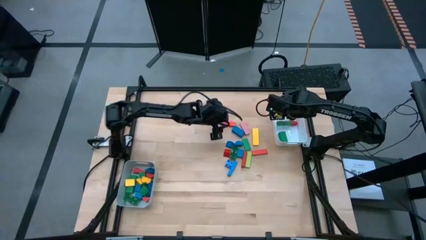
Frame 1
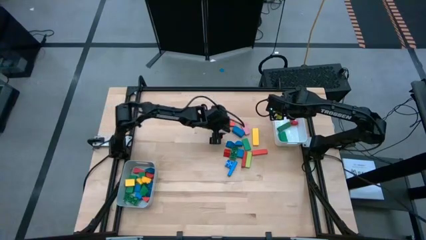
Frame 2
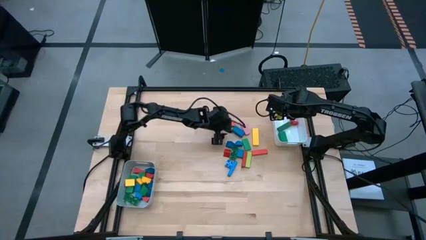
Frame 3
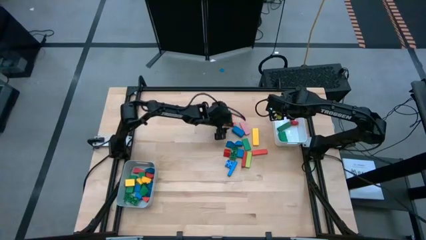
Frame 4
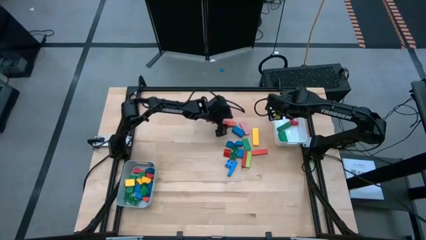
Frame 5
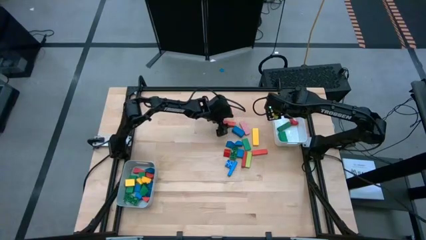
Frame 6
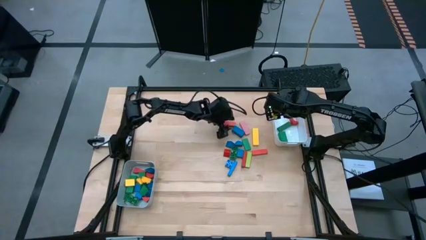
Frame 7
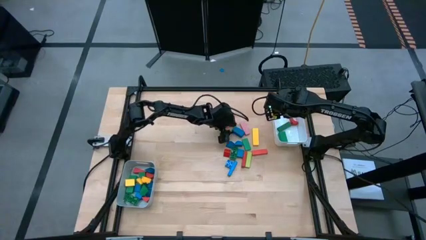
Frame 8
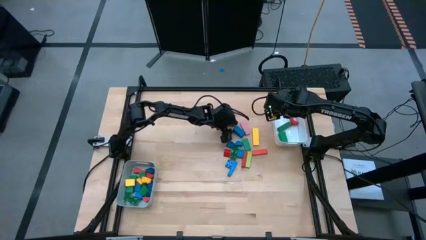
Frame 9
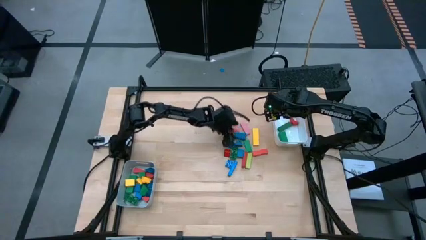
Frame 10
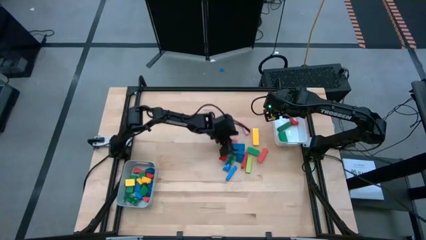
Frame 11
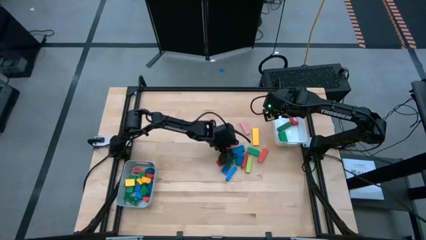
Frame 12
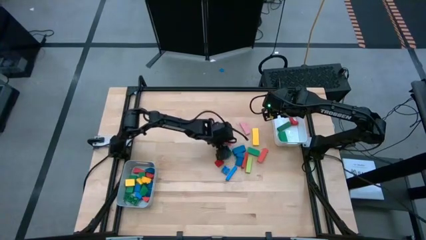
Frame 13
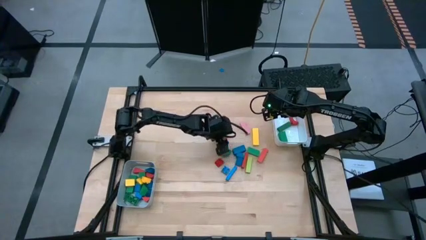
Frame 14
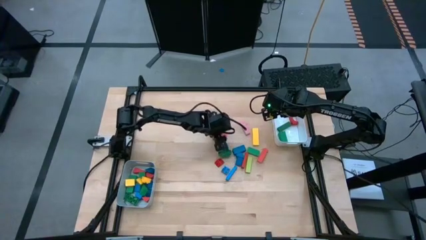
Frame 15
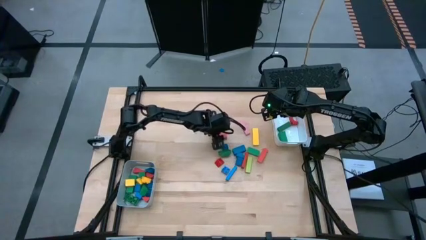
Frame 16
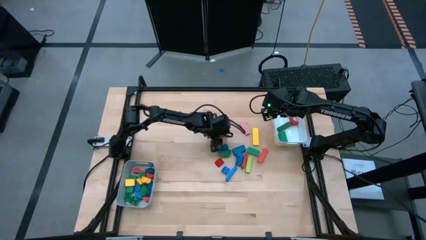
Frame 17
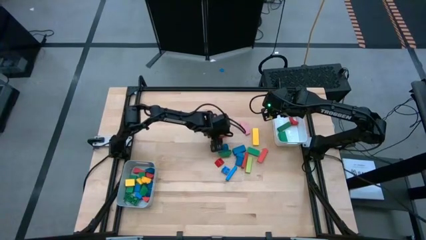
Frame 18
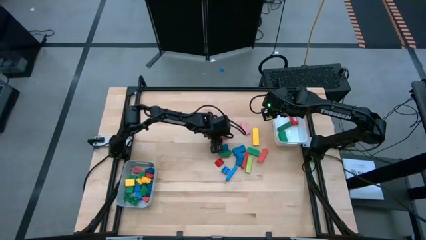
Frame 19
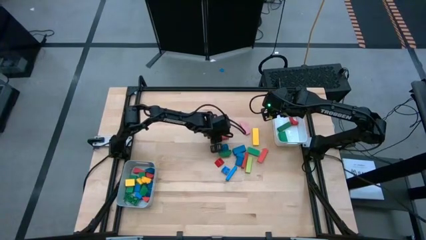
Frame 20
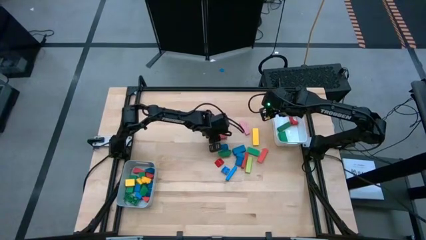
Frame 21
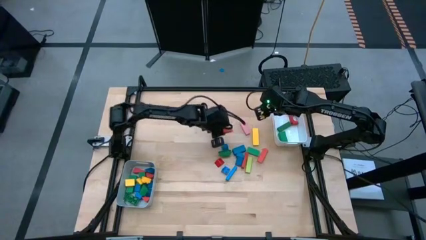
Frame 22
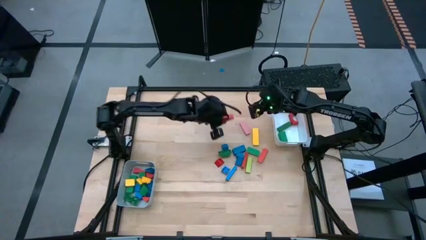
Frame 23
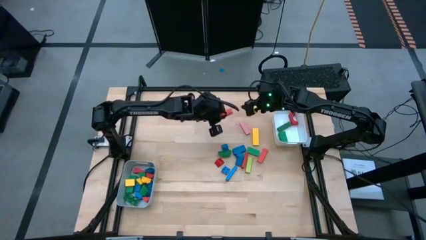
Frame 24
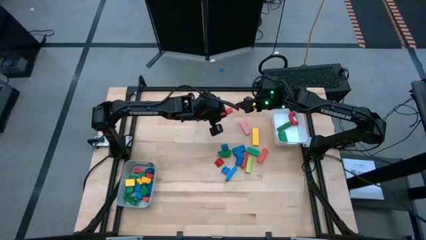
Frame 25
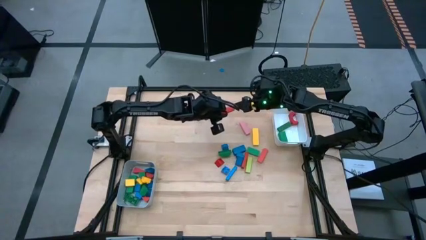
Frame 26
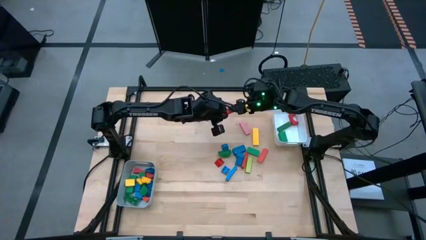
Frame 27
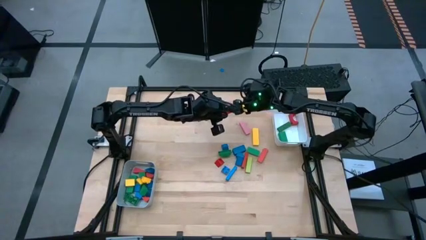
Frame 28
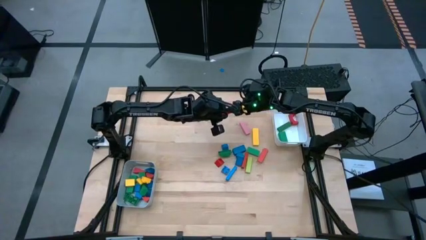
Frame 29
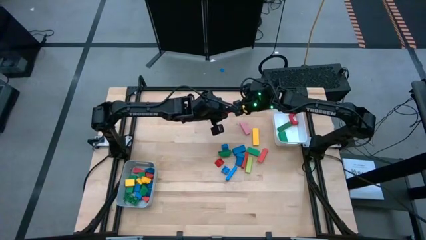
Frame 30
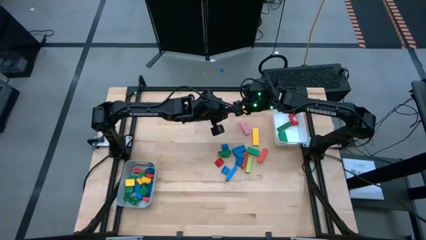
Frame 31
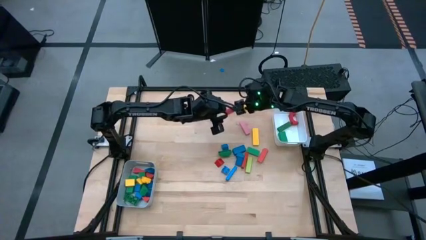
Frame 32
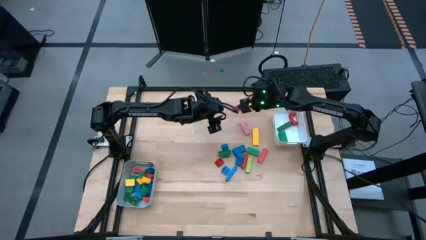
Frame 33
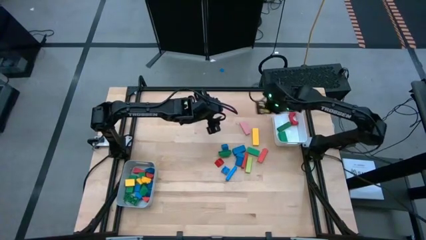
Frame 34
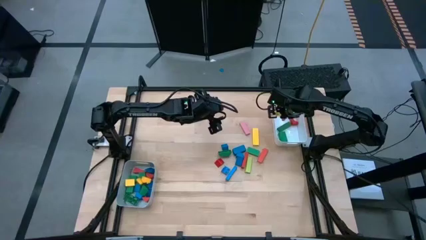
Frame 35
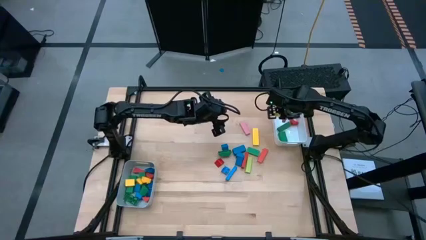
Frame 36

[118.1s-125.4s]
Task: Sort blocks by size
Put the orange block into the white bin

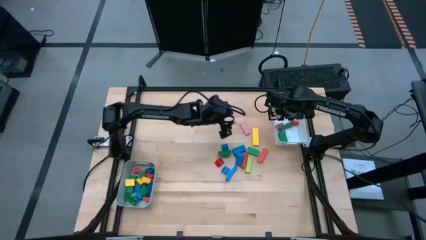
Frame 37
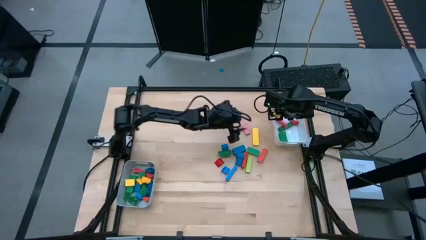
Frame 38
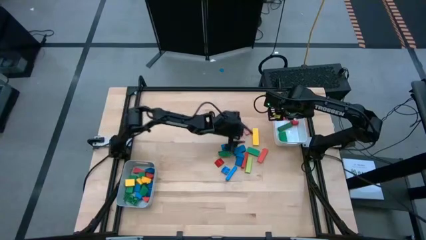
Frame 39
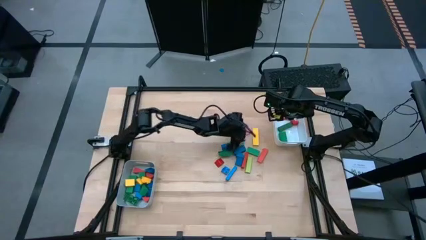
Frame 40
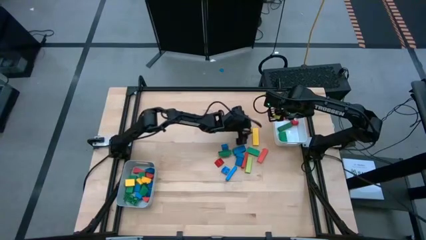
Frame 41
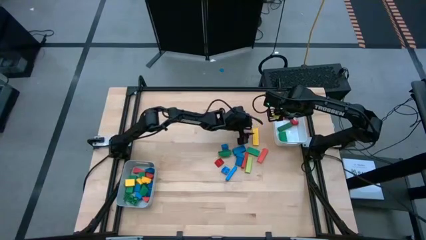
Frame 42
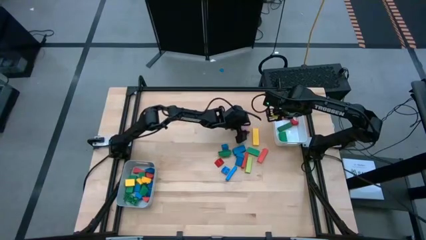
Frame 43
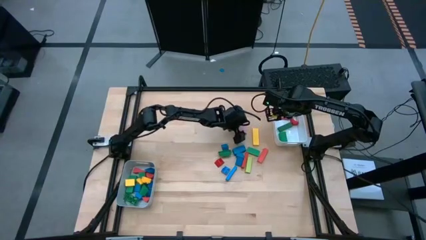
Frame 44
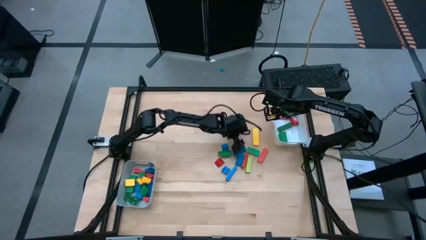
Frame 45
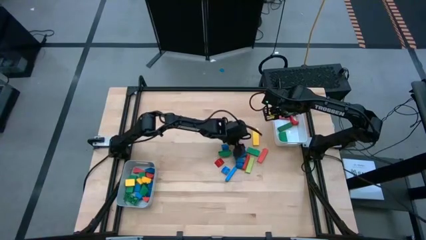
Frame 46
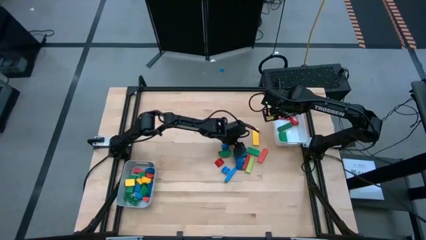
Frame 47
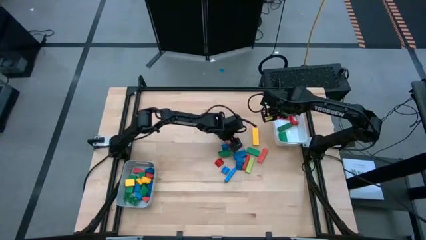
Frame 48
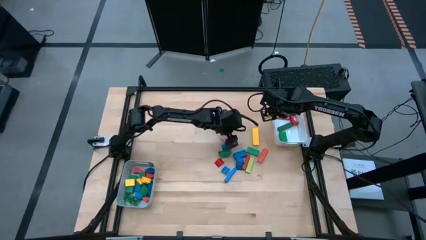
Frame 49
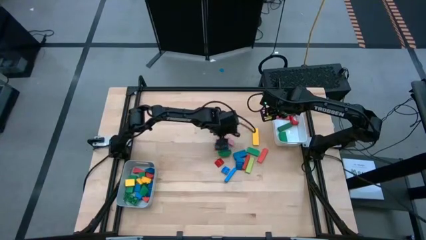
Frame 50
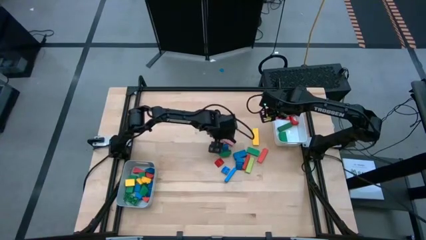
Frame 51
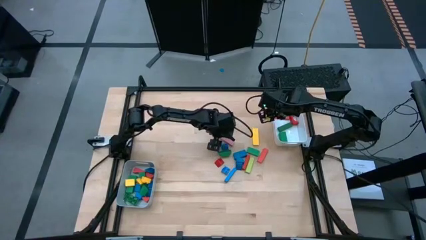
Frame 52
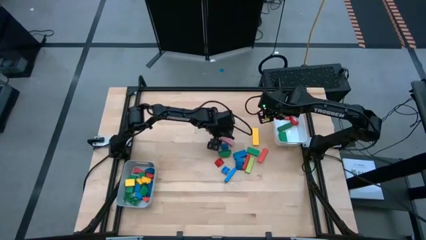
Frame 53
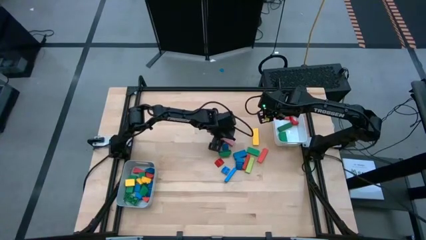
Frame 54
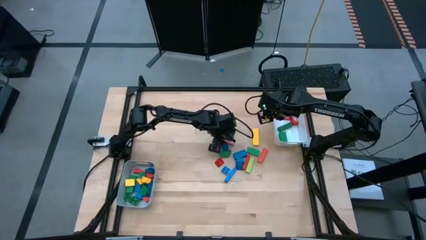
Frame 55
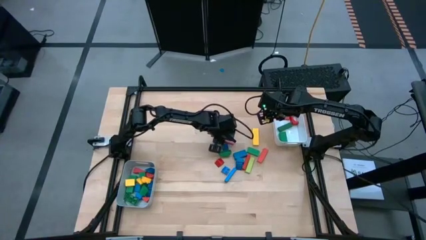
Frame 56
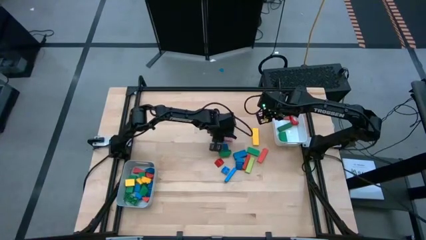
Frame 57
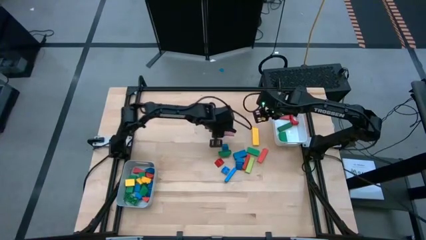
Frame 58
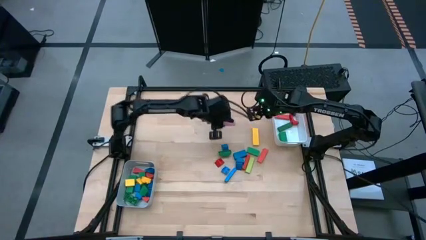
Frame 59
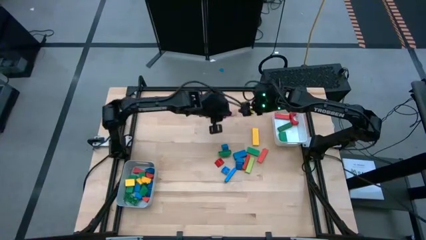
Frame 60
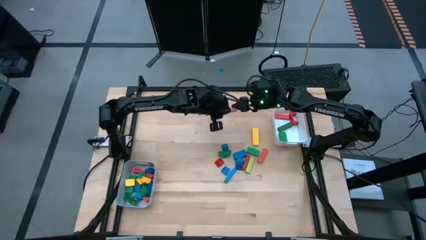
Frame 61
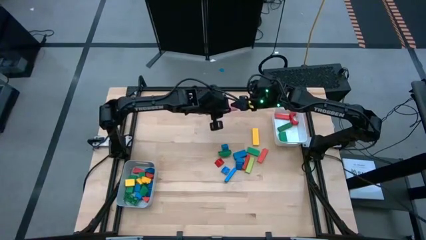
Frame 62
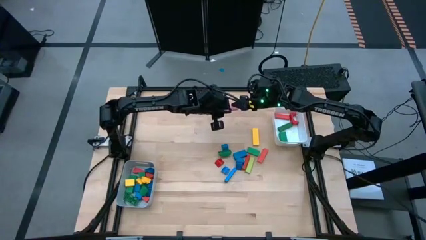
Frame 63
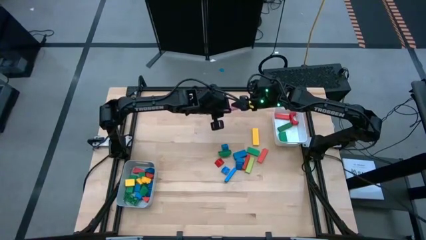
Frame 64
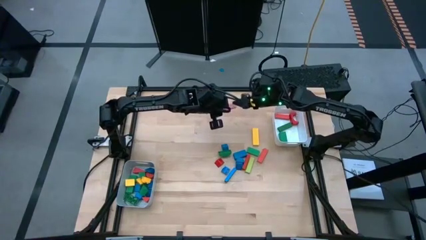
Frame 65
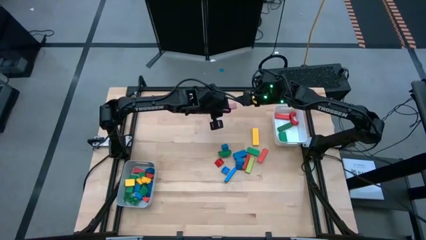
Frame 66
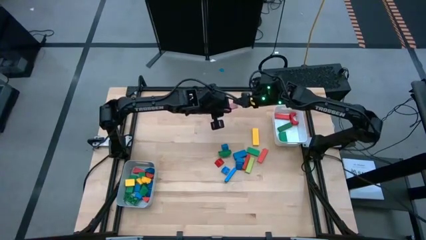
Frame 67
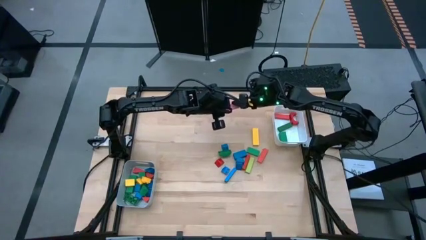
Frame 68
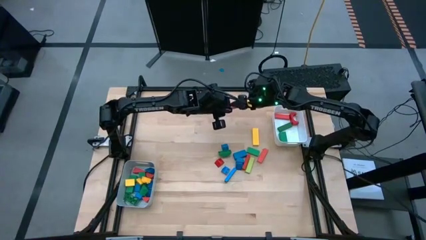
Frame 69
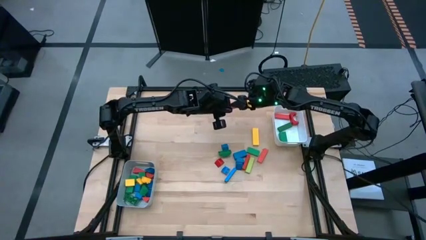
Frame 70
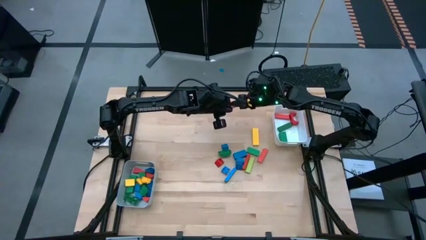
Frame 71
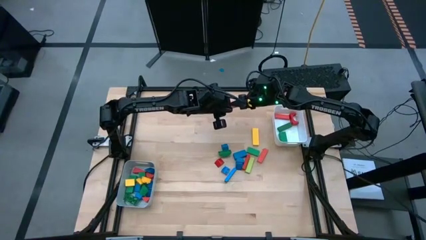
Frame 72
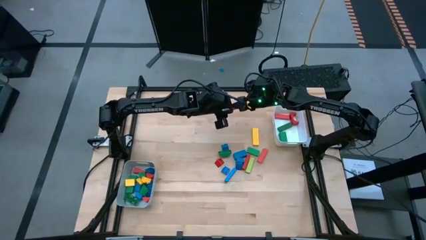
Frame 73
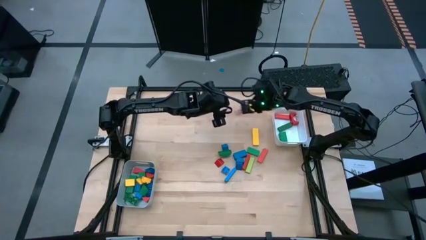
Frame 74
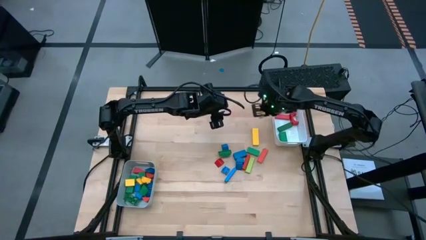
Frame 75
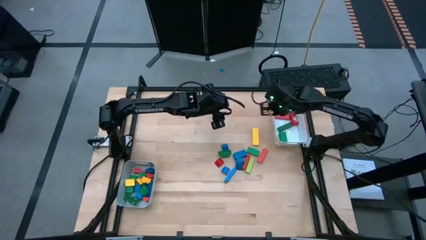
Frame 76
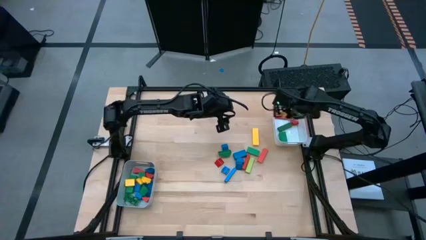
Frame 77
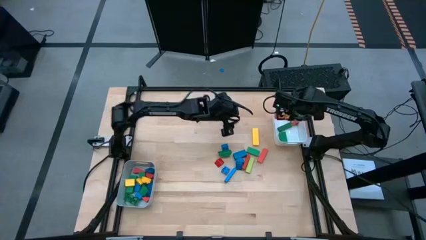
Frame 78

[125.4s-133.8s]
Put the pink block into the white bin
